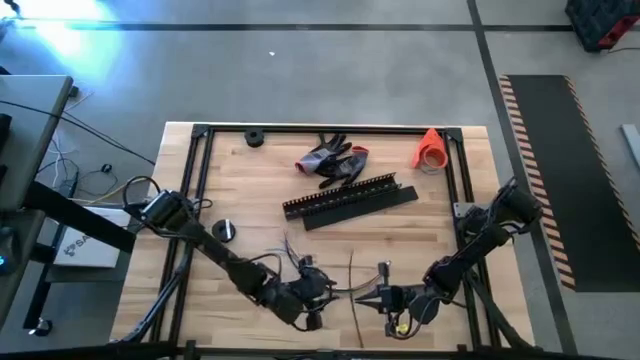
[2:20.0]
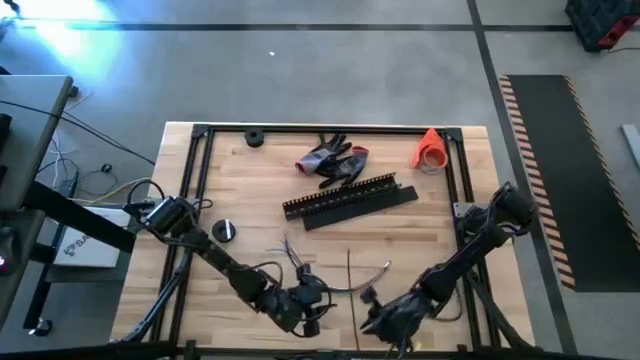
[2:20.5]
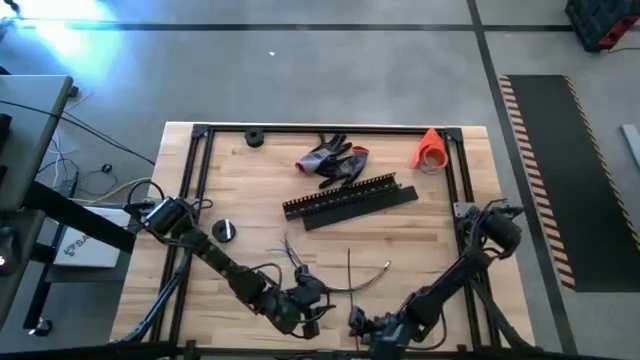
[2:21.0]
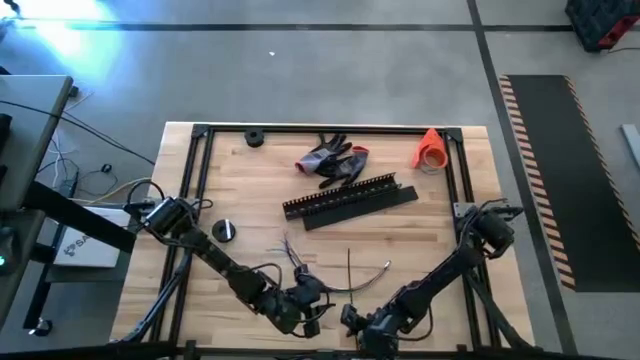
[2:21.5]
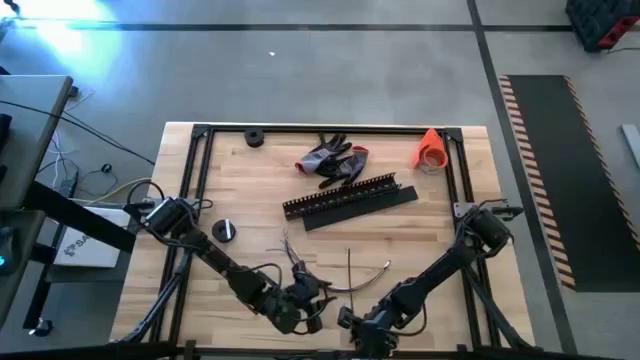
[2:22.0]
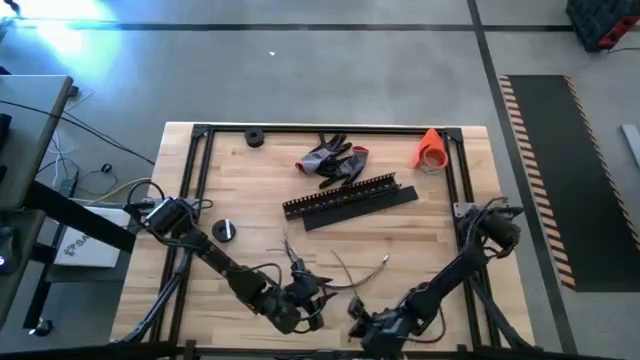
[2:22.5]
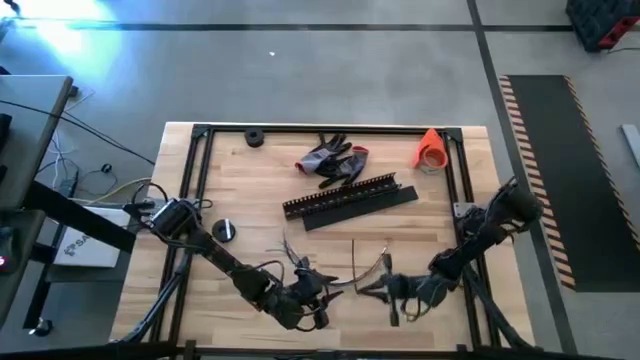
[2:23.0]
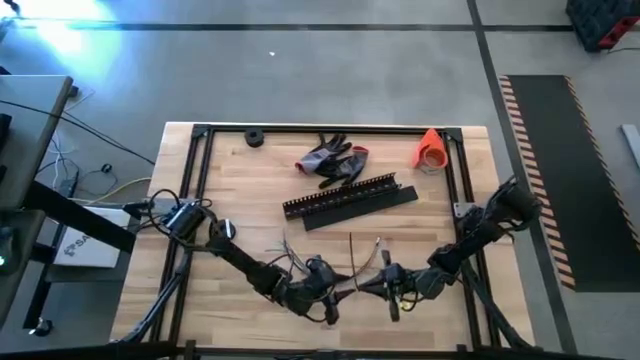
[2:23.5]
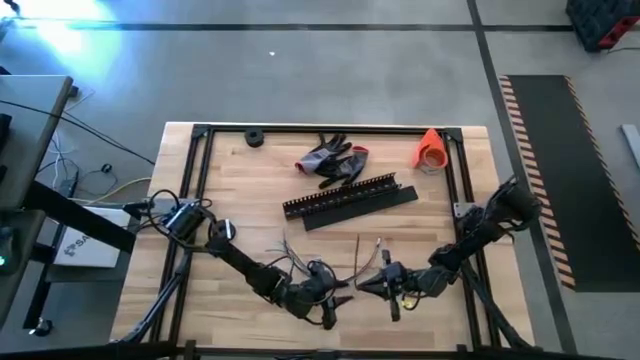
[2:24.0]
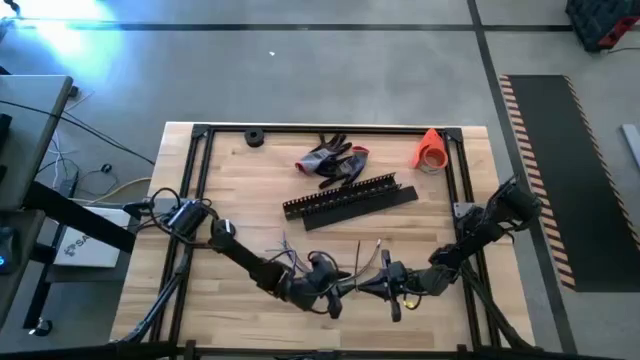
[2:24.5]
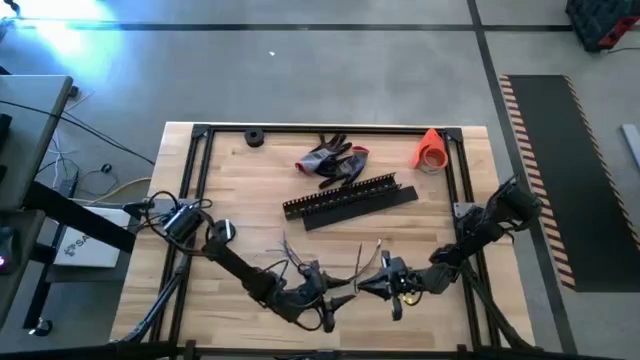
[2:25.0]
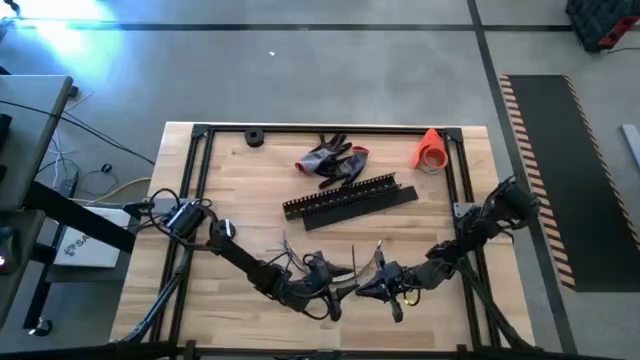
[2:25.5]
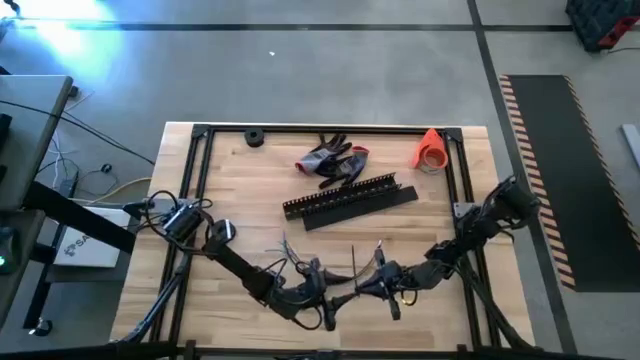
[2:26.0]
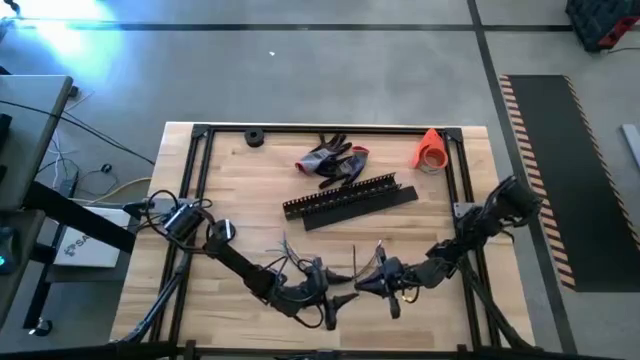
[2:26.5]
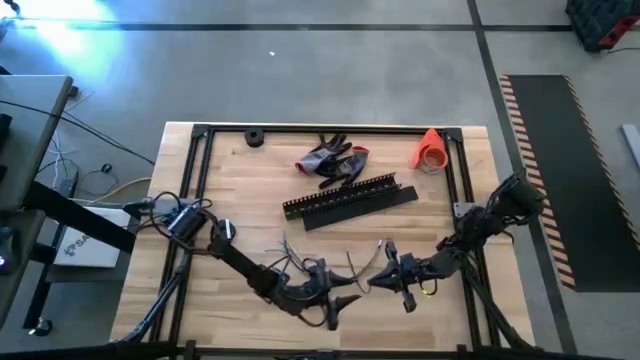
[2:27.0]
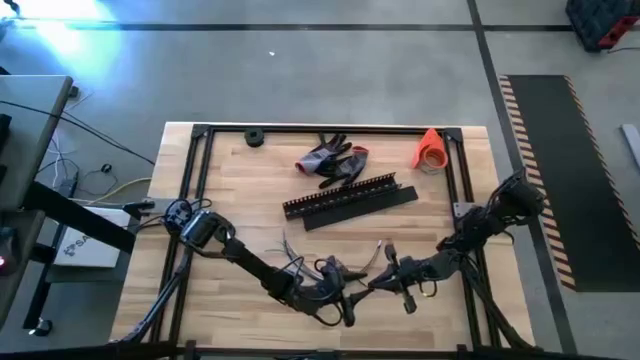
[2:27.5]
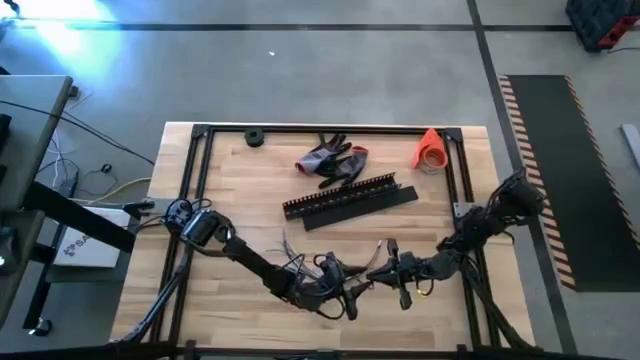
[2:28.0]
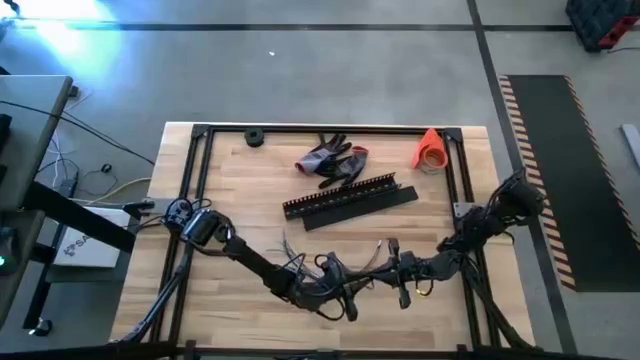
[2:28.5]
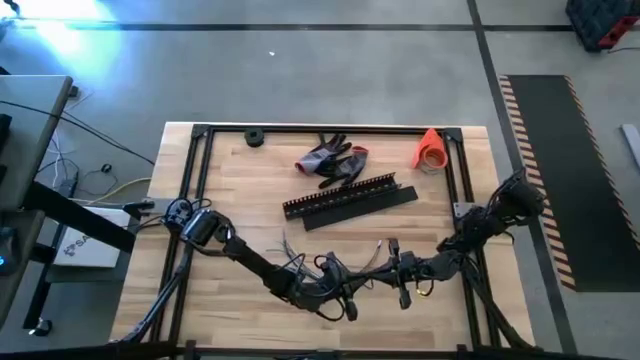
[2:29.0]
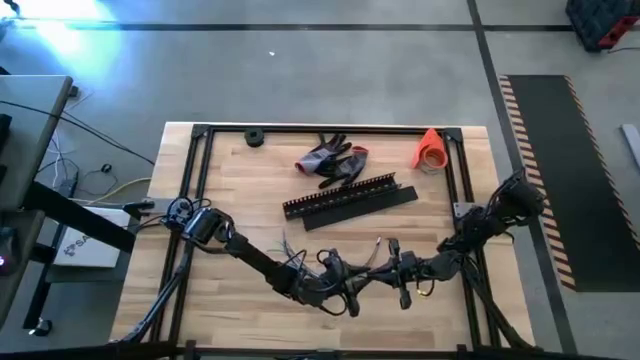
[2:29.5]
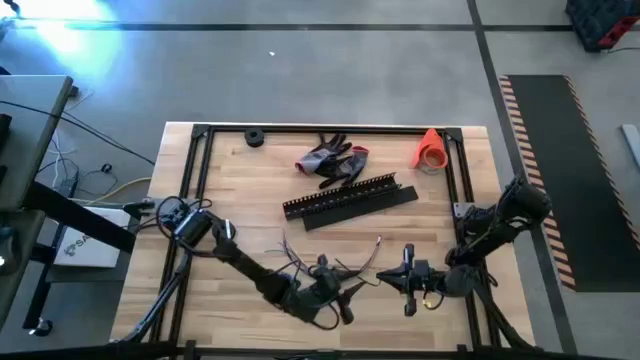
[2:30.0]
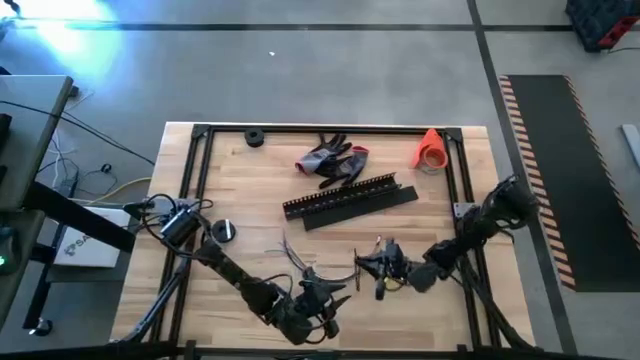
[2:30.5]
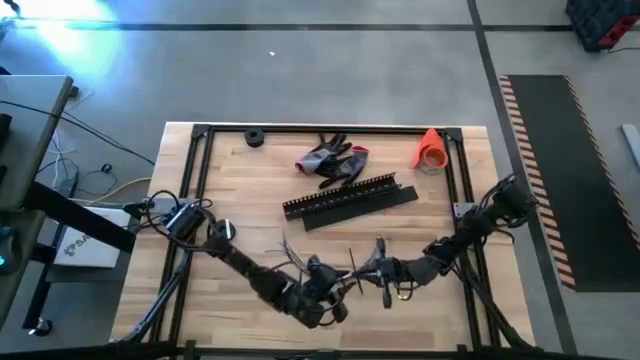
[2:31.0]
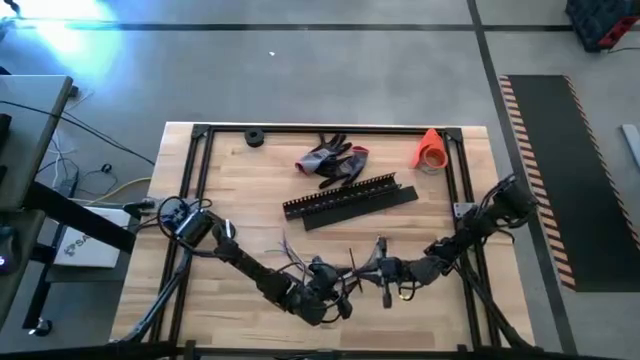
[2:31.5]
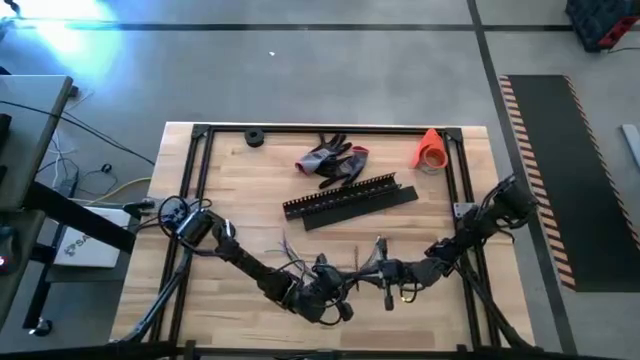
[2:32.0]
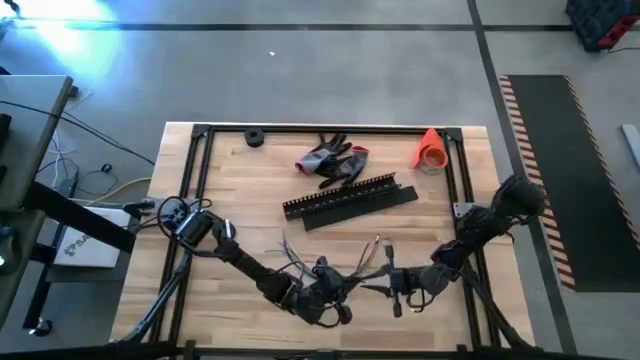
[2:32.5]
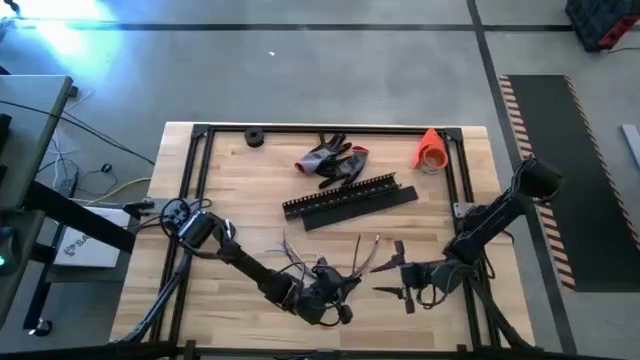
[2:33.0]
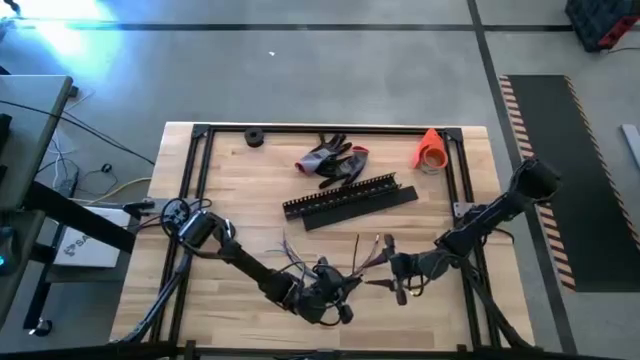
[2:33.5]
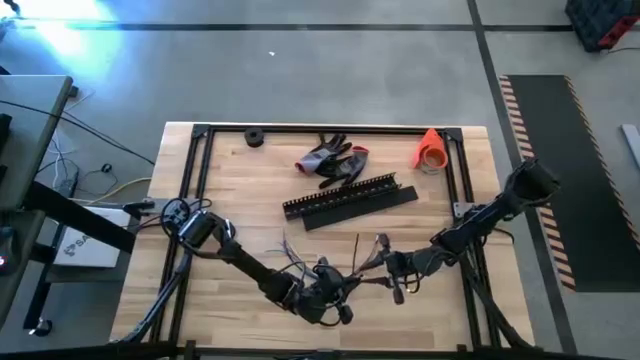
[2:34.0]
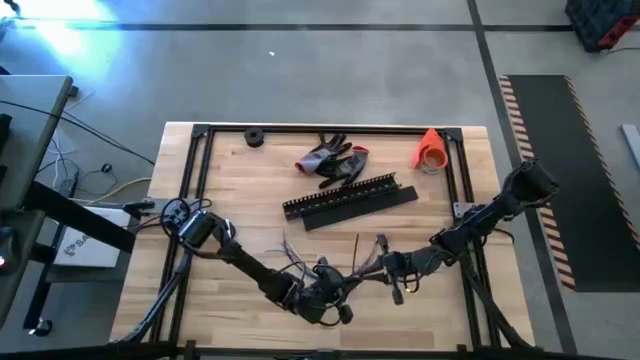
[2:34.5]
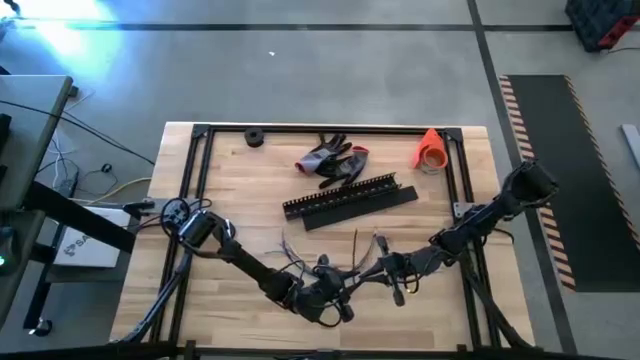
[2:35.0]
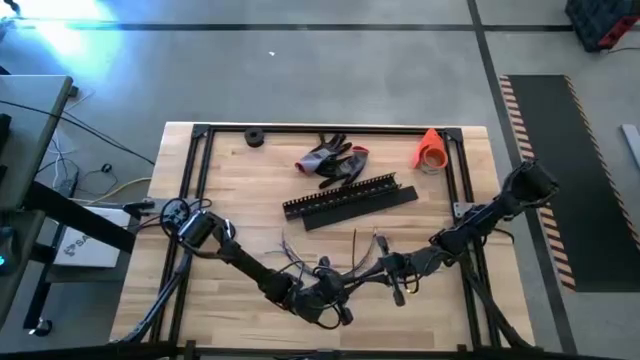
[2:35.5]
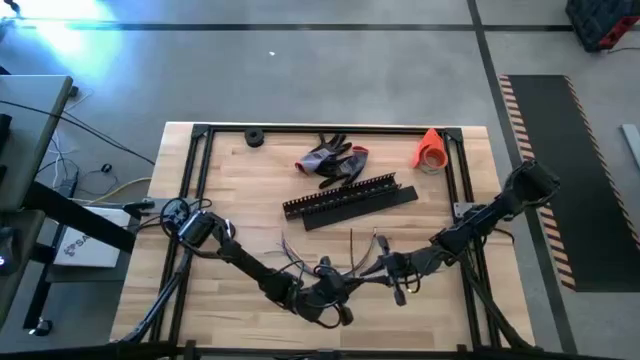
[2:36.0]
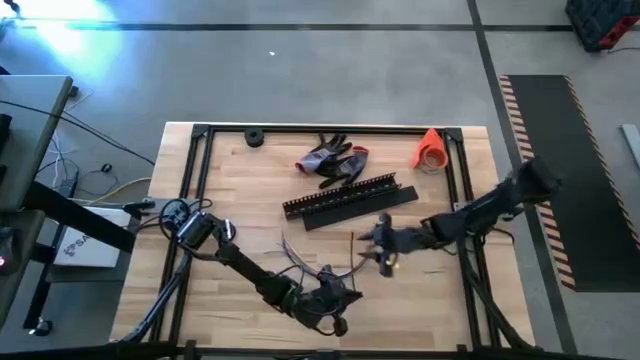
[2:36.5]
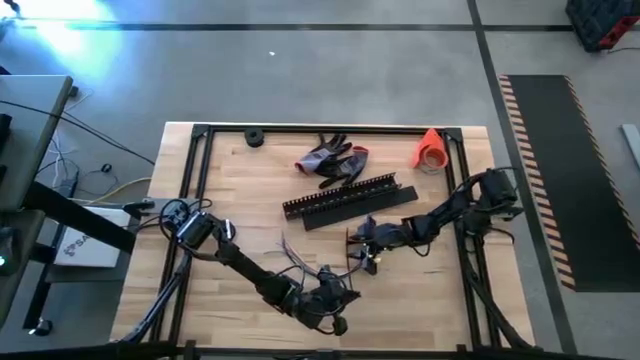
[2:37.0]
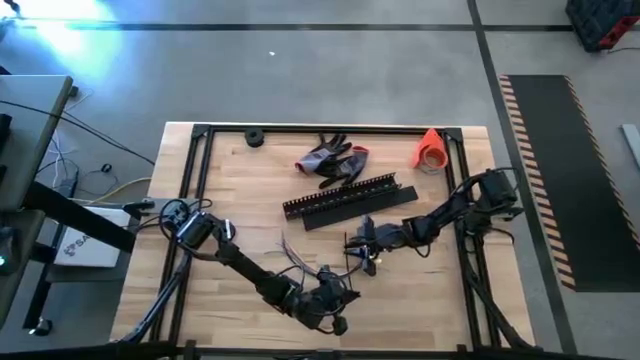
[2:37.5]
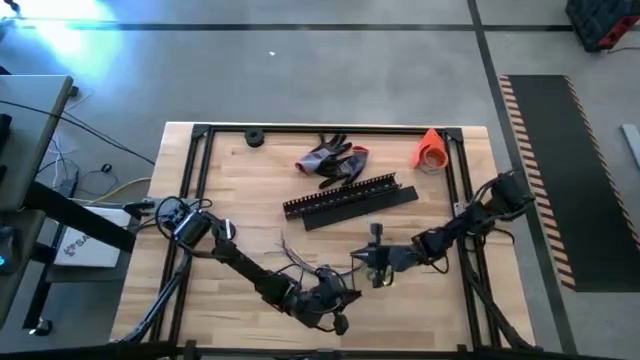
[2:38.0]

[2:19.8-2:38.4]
Task: Ziptie cables
Wrap the cables using a black zip tie

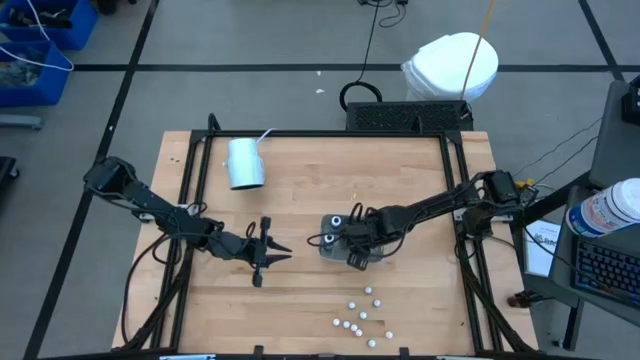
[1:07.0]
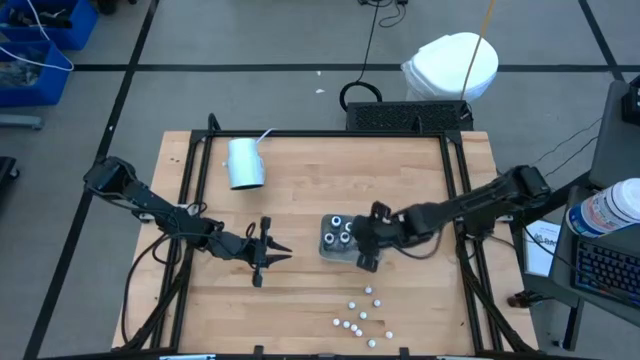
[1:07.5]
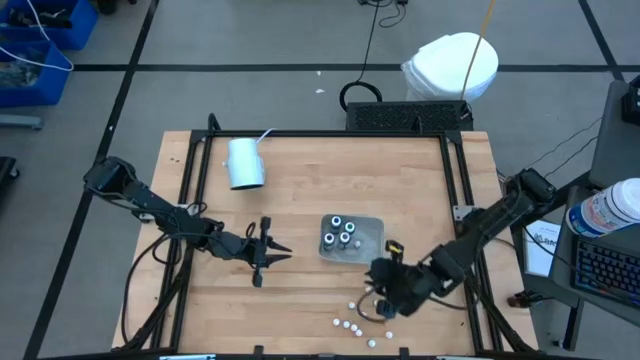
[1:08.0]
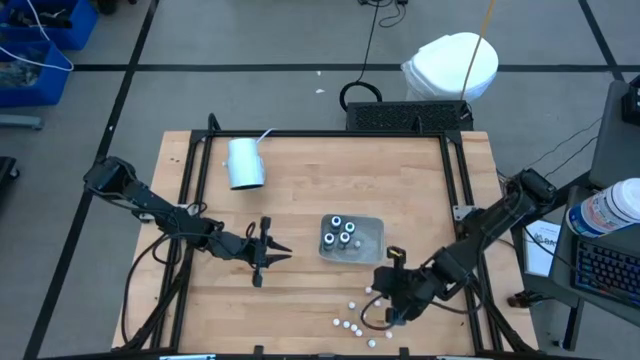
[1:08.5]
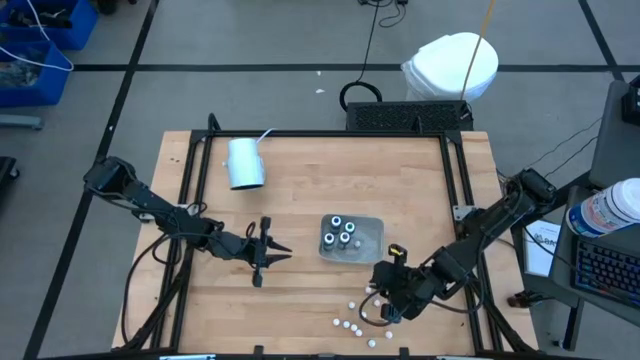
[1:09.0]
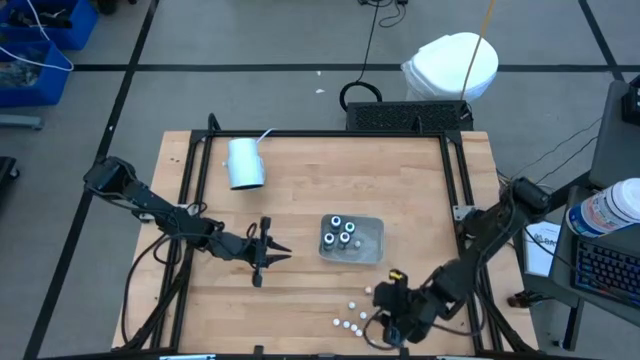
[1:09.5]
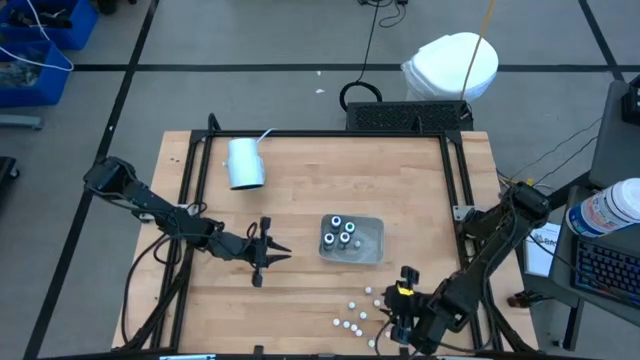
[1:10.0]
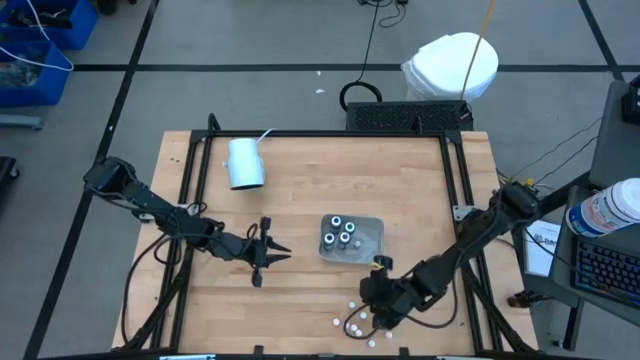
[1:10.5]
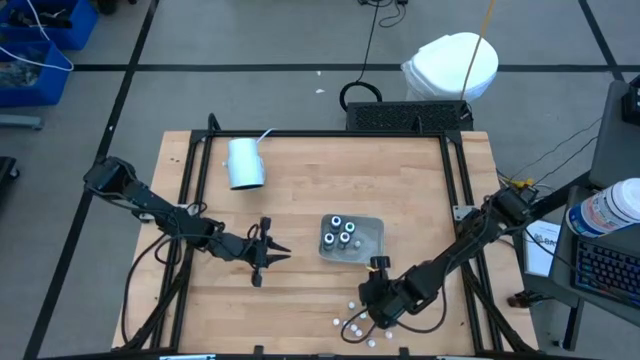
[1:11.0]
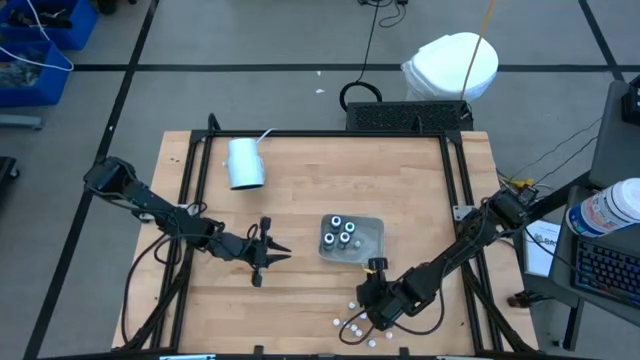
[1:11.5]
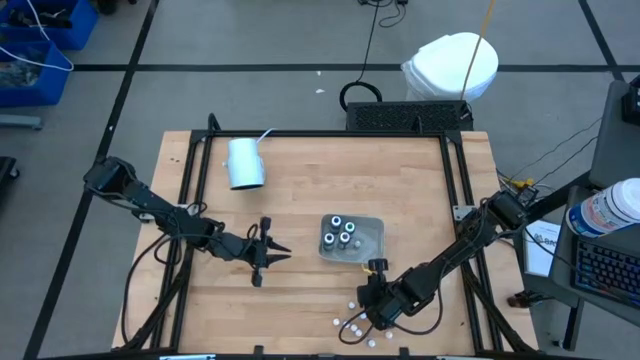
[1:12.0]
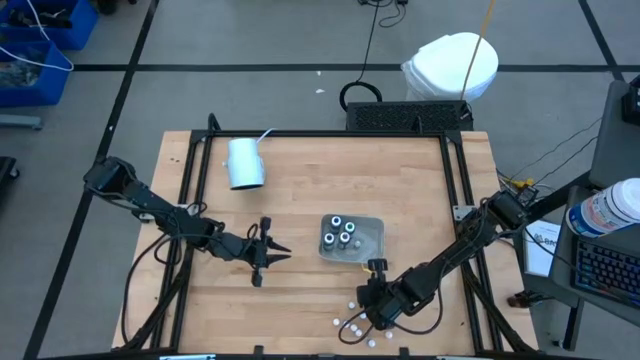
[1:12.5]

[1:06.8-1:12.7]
Task: Pick & Place food coloring
Put the small blue food coloring bottle into the gray bin
